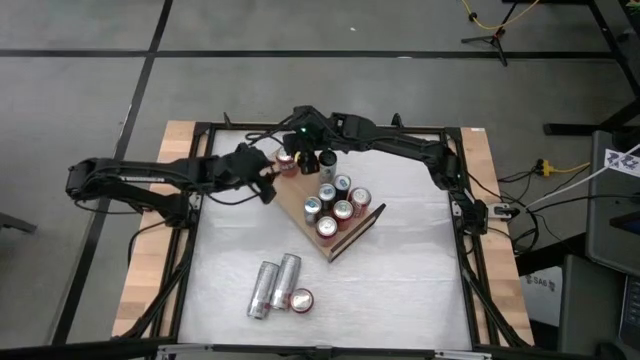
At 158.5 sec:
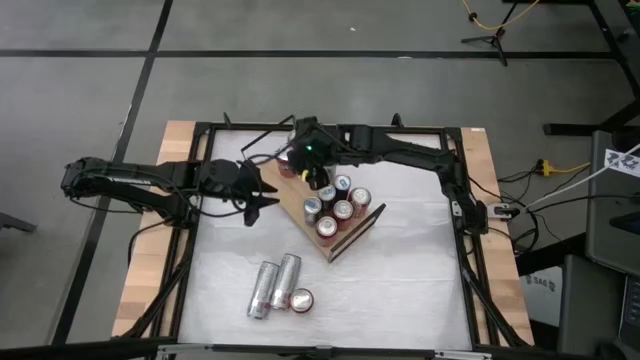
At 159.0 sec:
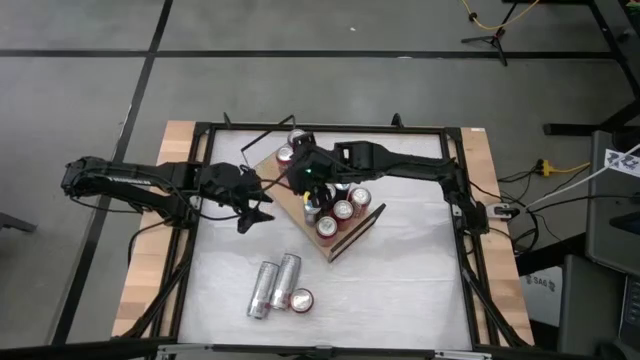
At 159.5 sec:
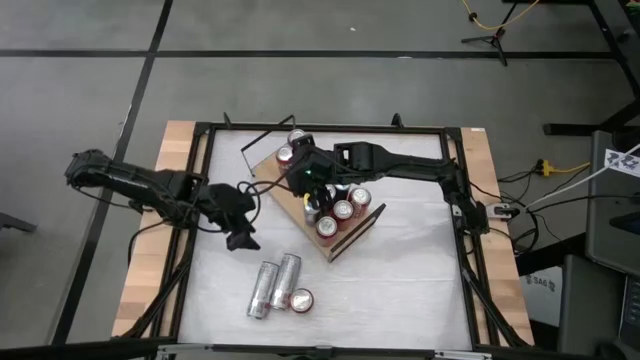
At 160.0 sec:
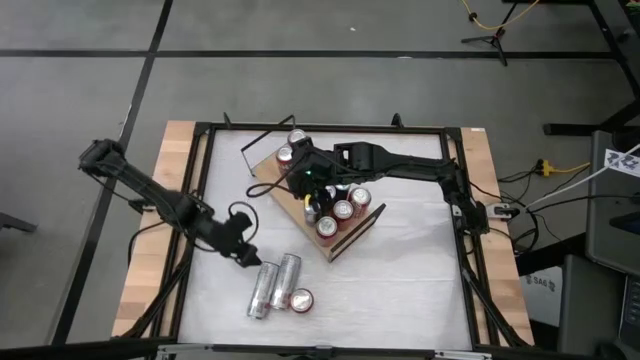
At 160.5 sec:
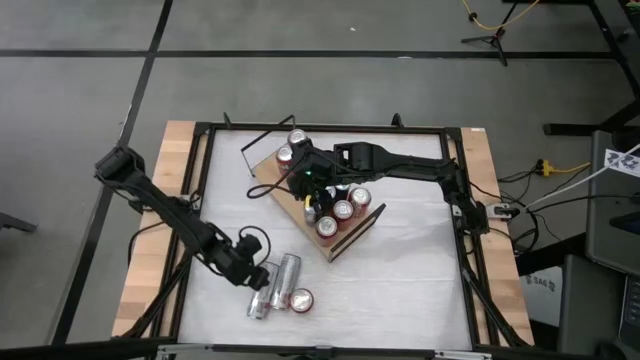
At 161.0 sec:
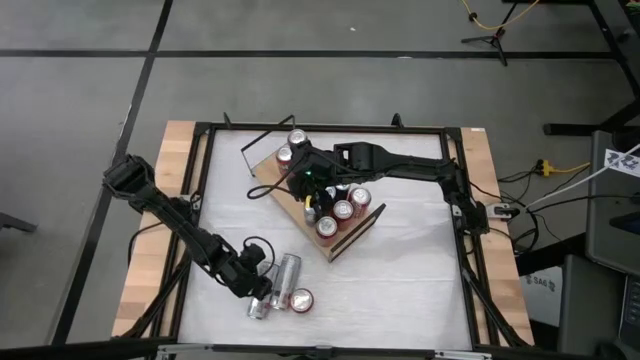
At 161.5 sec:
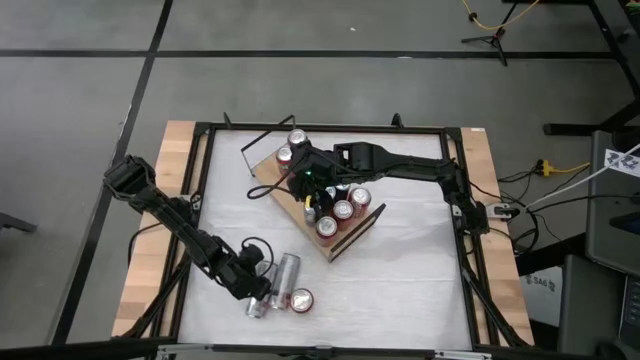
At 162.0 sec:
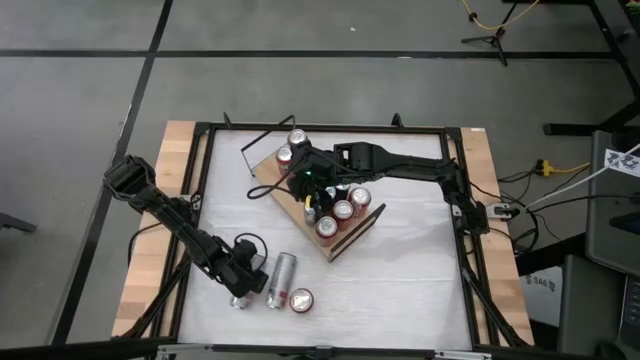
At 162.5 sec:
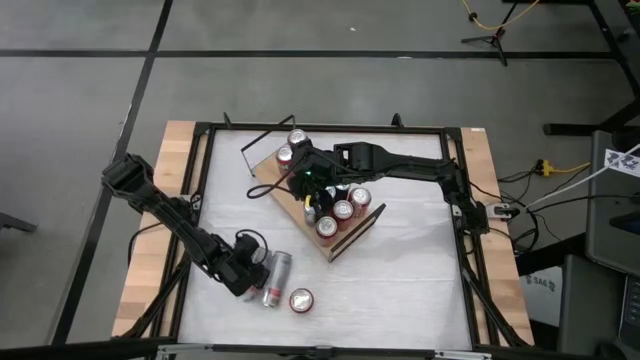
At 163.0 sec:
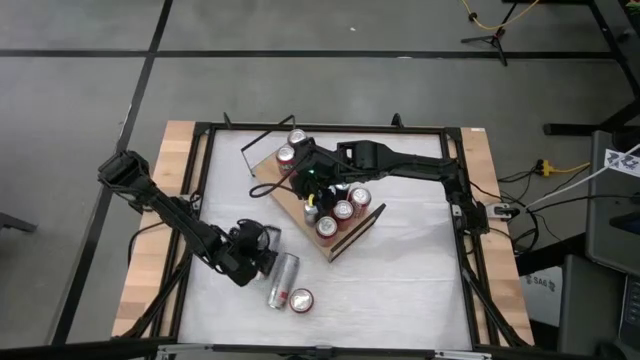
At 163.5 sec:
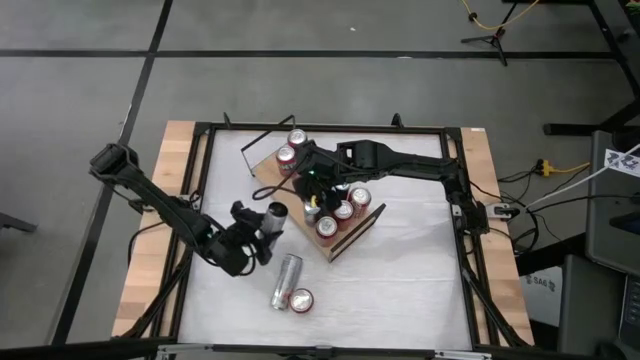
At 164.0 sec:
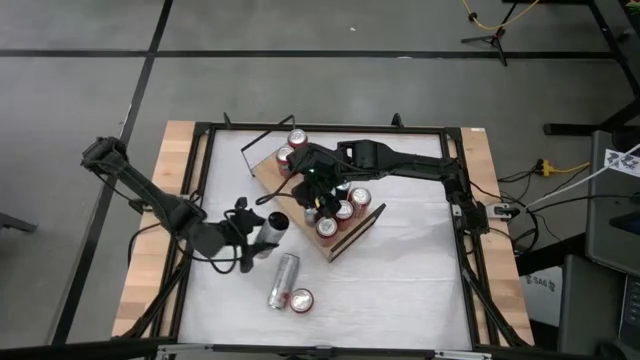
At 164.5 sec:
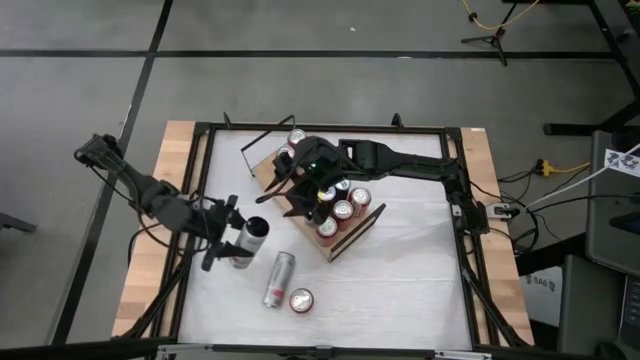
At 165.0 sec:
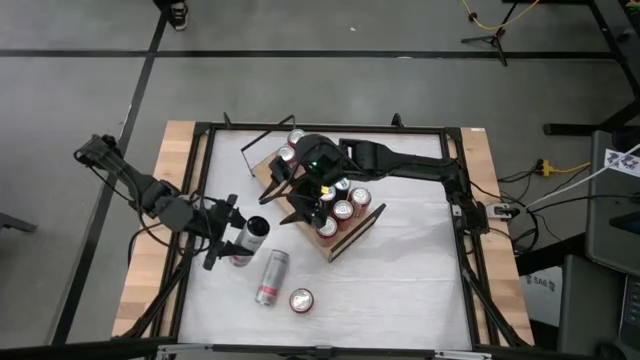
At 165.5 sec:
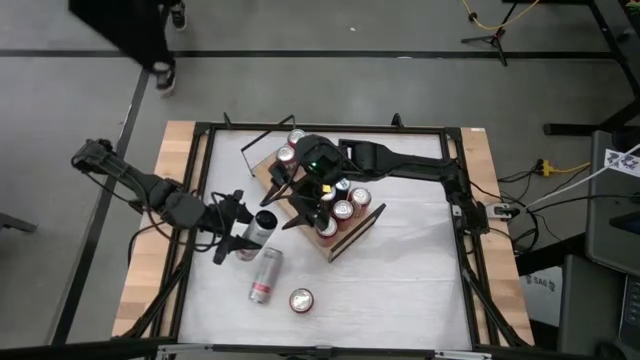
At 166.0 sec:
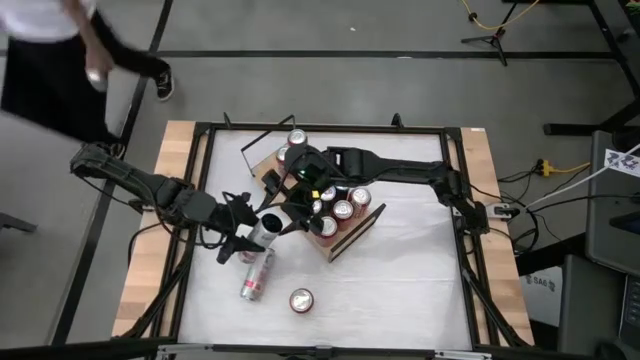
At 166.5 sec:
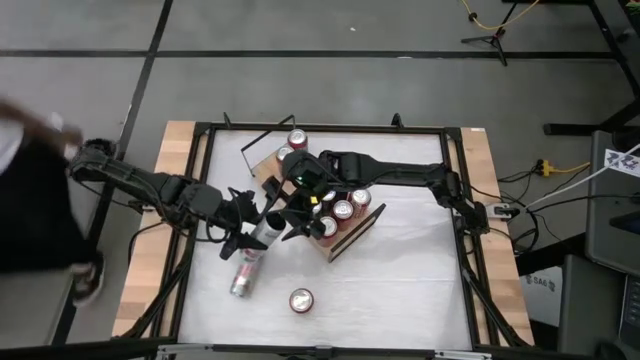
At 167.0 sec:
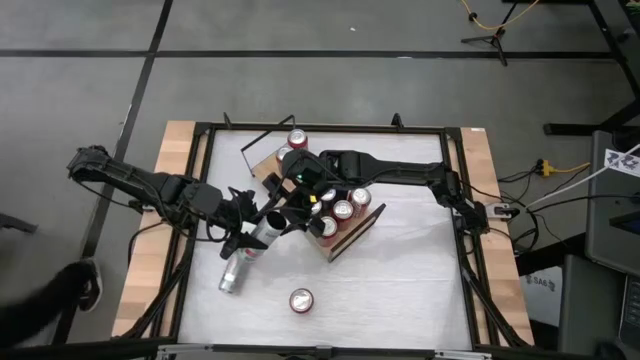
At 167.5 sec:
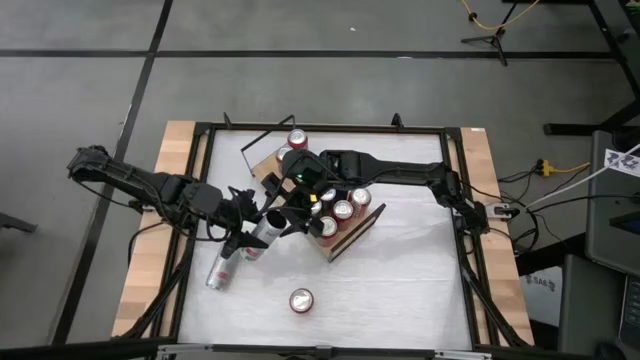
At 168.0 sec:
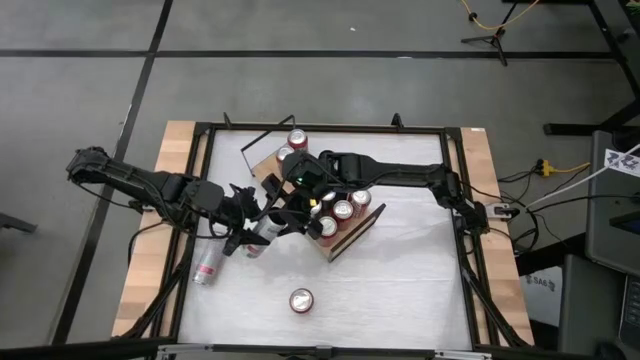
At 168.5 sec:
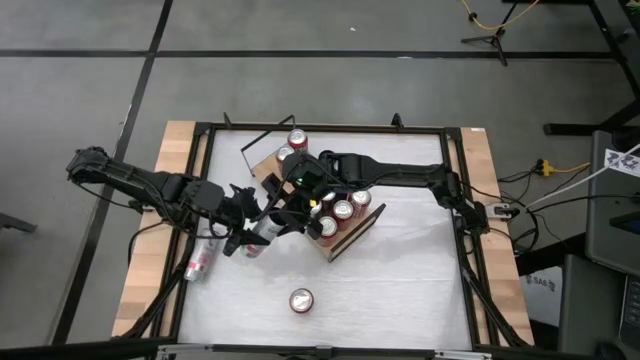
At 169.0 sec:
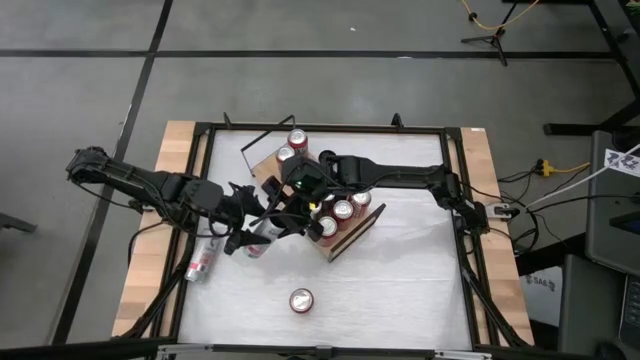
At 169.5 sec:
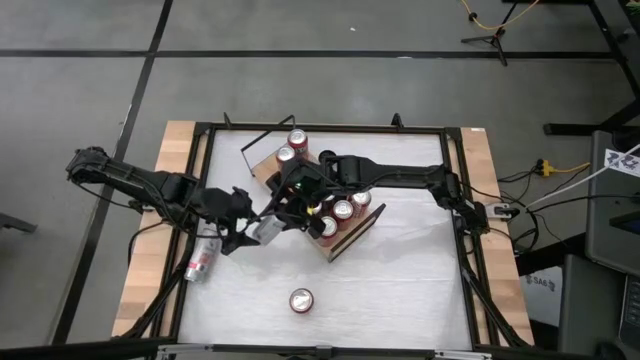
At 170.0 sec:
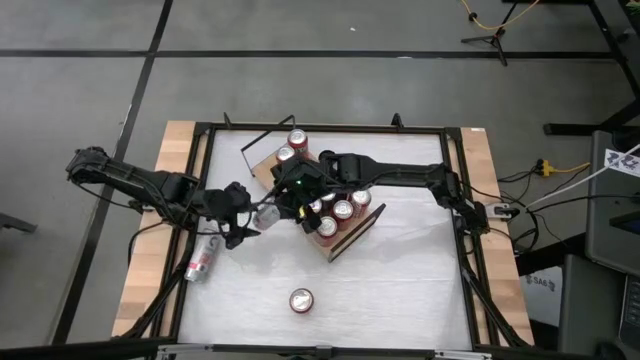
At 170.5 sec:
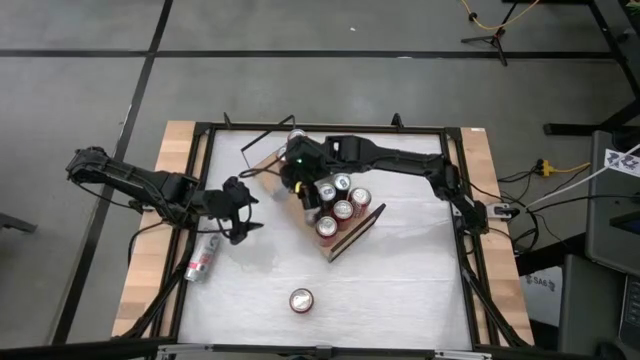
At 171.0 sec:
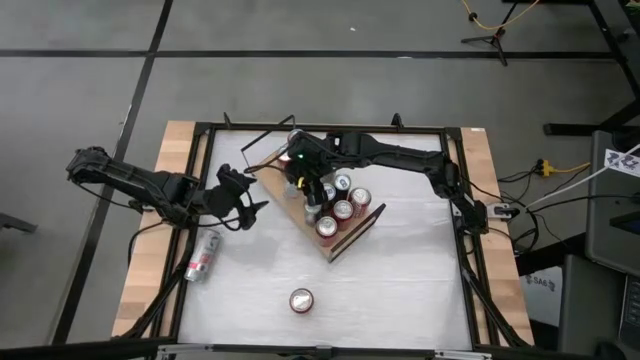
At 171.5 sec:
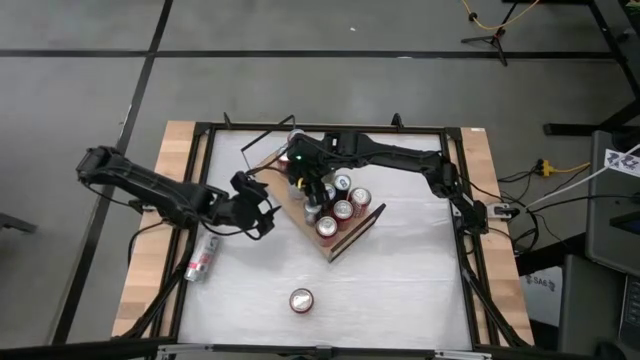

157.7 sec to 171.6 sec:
Task: Place canned beverage on shelf
Put the left white pink soda can on the shelf aligned with the other white pink soda can

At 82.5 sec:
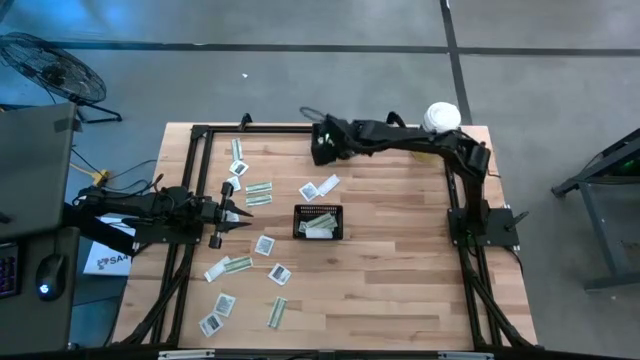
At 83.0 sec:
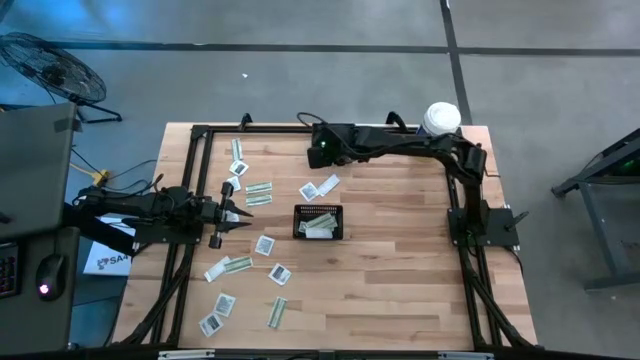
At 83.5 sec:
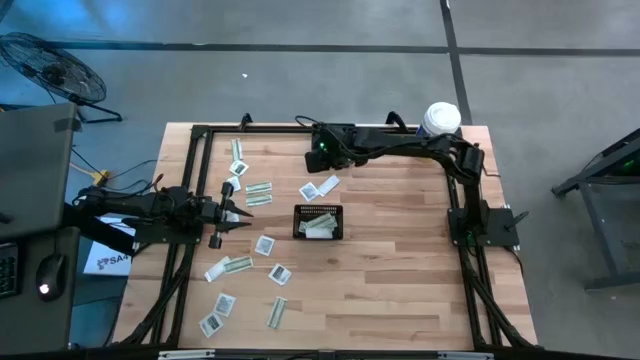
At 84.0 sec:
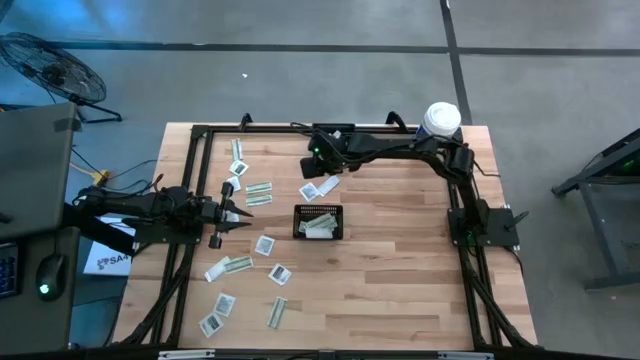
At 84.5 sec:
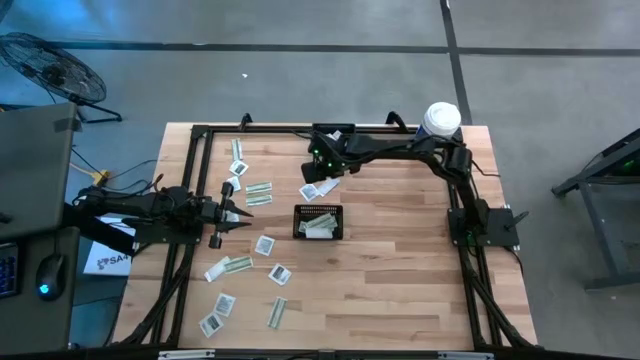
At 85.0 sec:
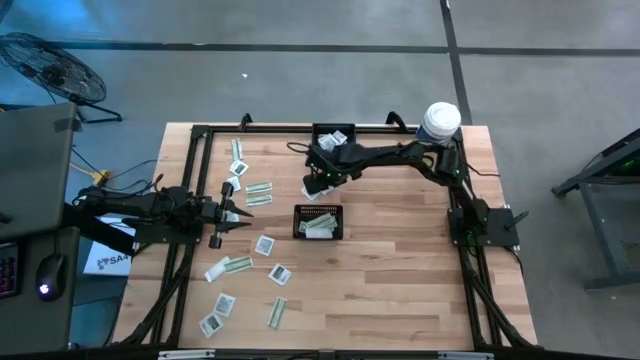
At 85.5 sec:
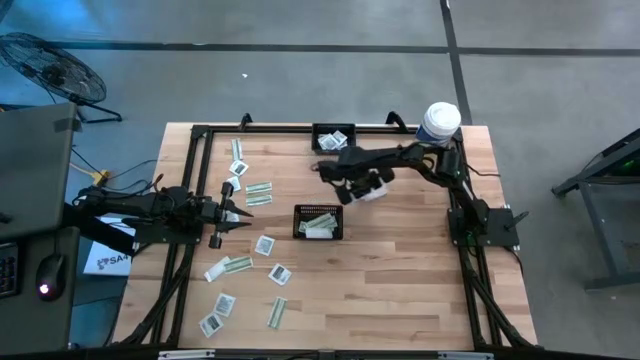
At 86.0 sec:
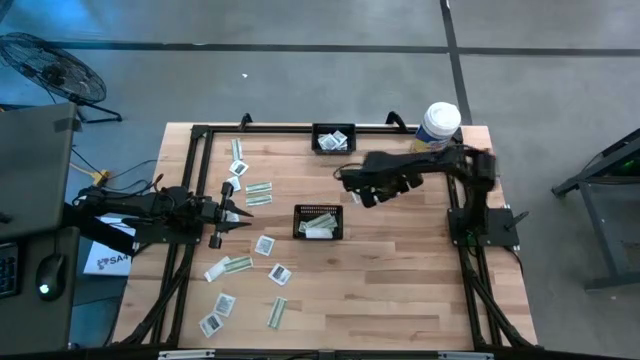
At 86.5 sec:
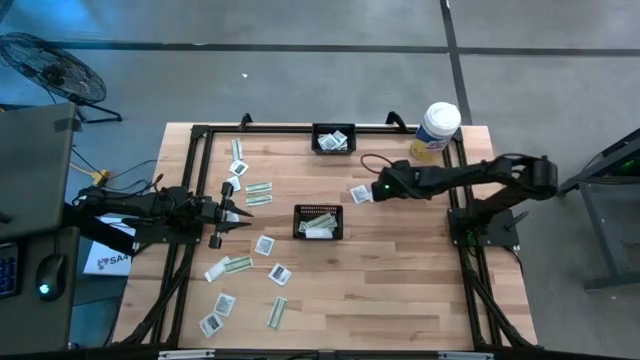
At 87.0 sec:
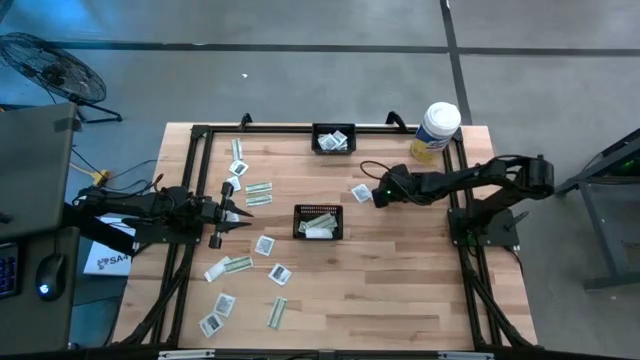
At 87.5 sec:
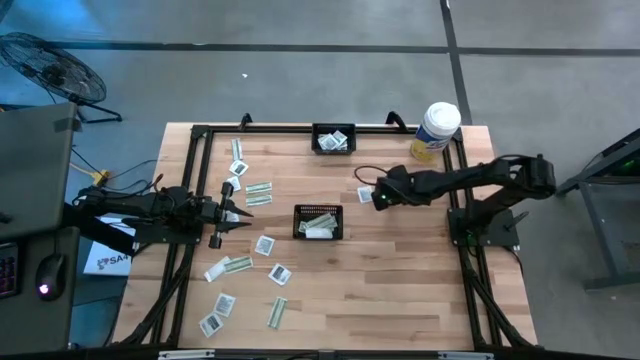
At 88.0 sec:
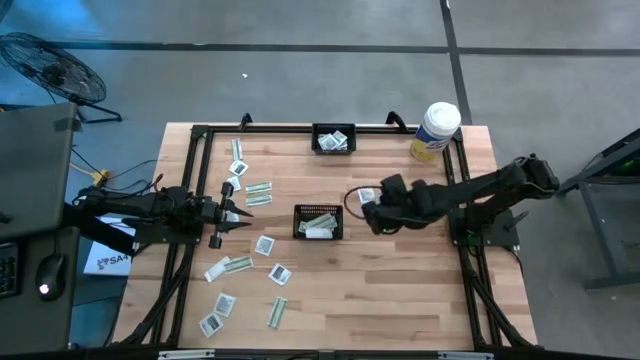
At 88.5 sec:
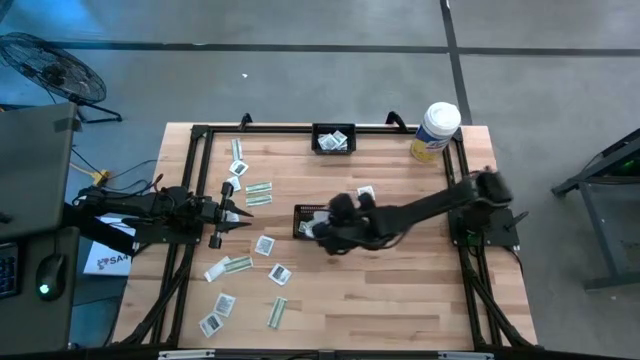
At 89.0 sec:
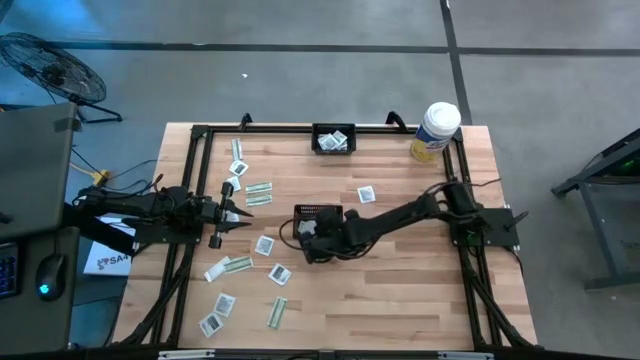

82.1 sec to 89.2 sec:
Task: Pick & Place First Aid Supplies
Put the bandage into the bottom black basket
